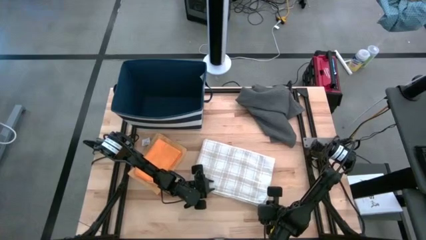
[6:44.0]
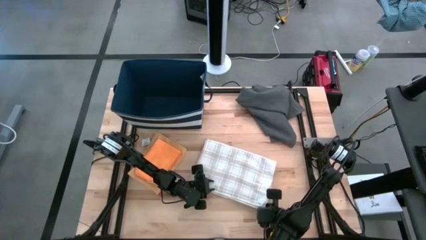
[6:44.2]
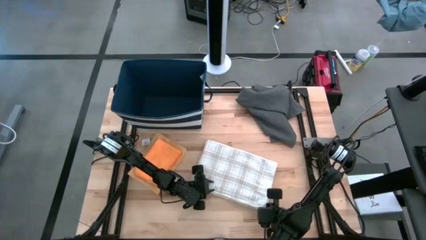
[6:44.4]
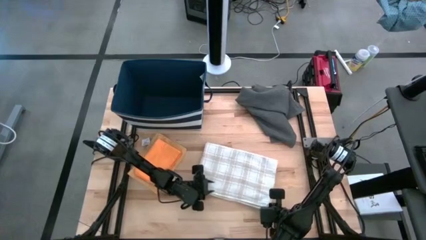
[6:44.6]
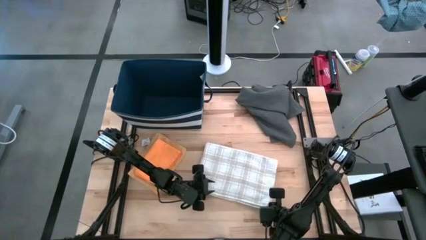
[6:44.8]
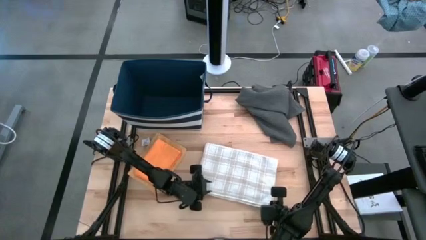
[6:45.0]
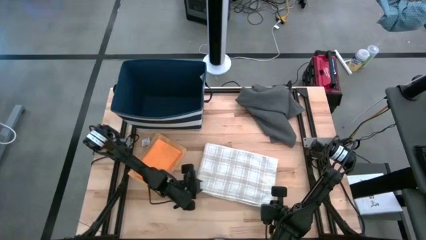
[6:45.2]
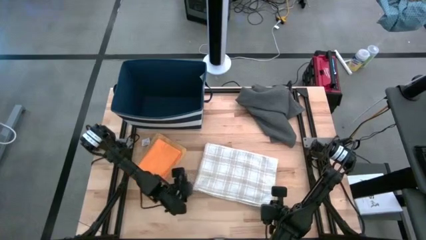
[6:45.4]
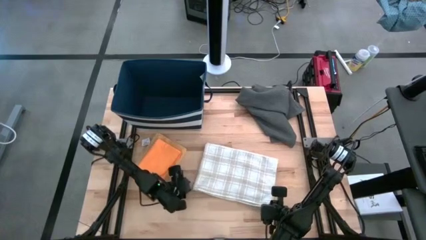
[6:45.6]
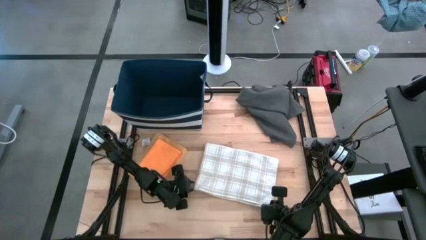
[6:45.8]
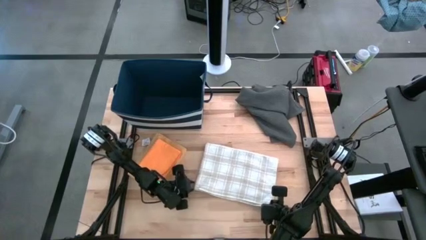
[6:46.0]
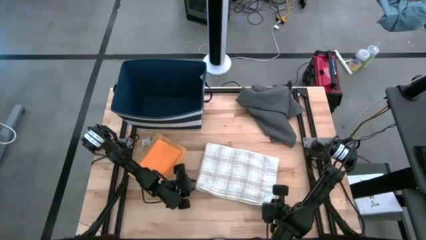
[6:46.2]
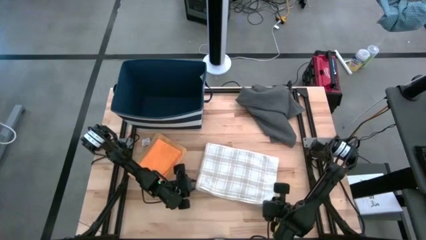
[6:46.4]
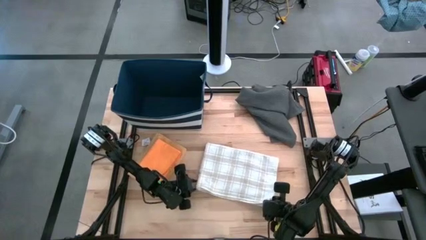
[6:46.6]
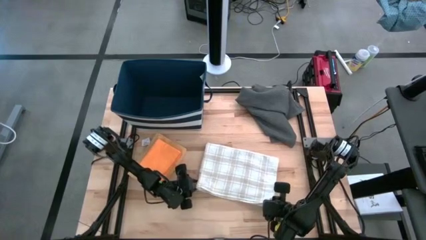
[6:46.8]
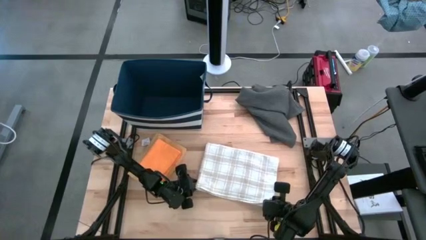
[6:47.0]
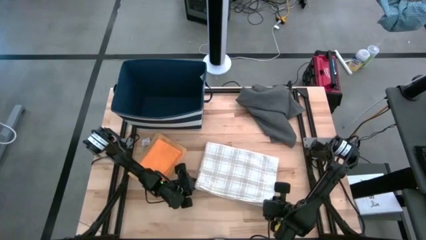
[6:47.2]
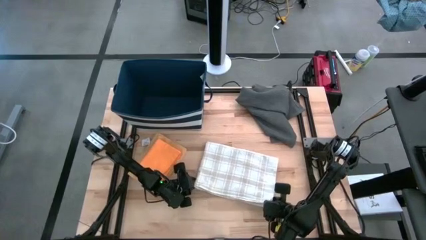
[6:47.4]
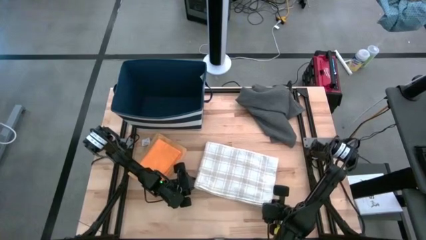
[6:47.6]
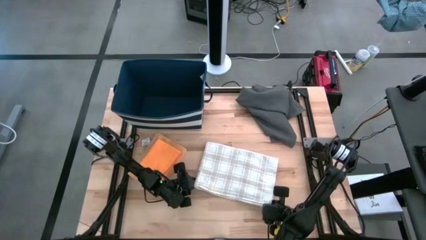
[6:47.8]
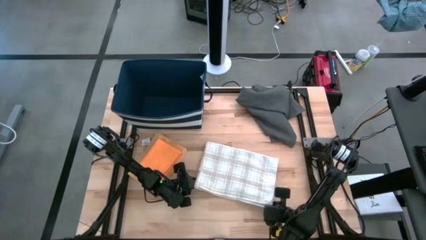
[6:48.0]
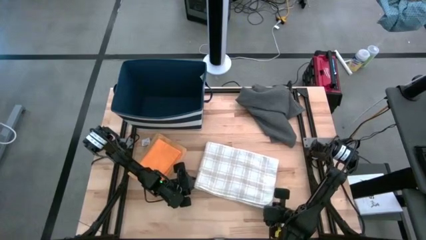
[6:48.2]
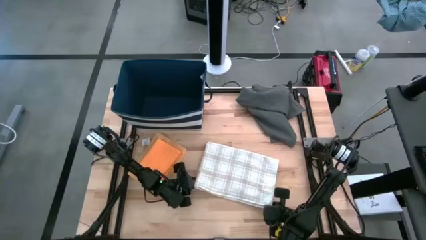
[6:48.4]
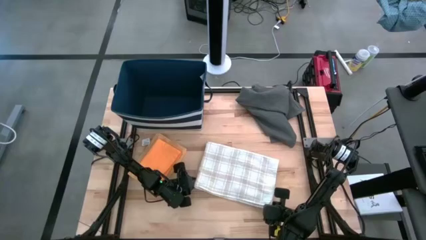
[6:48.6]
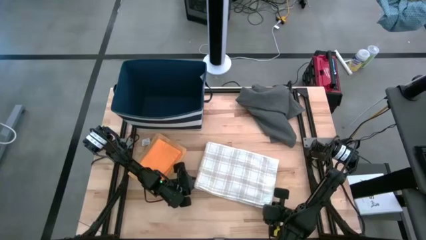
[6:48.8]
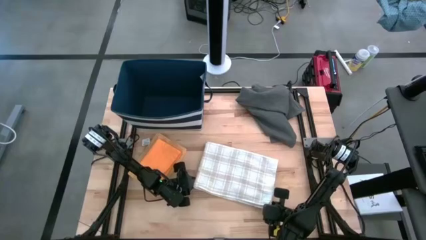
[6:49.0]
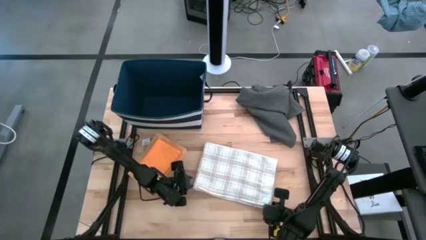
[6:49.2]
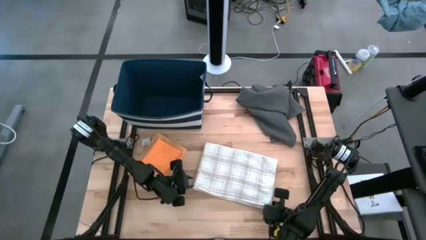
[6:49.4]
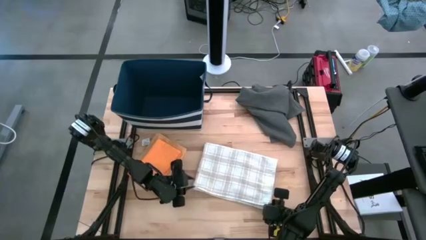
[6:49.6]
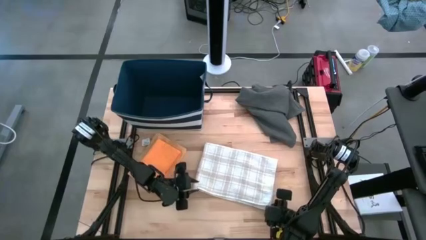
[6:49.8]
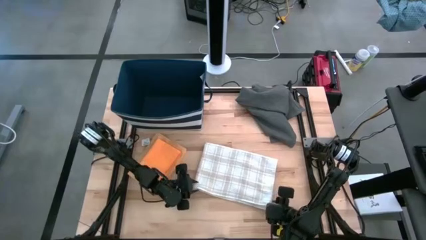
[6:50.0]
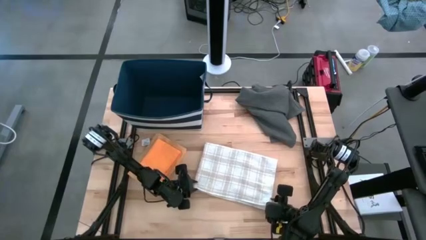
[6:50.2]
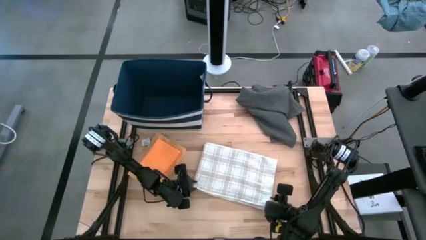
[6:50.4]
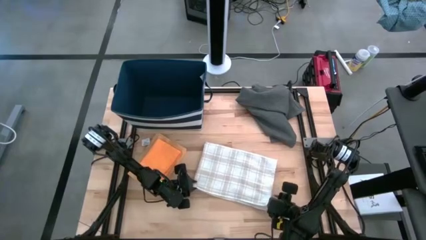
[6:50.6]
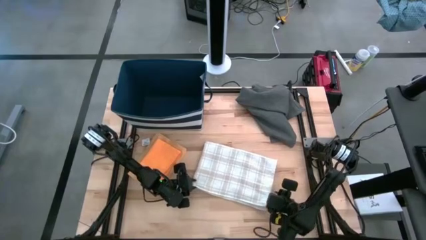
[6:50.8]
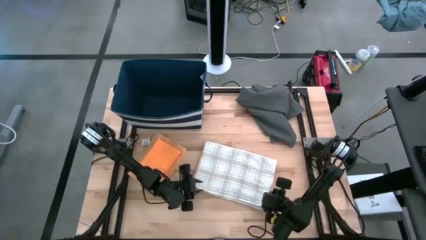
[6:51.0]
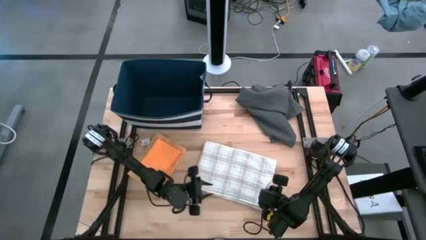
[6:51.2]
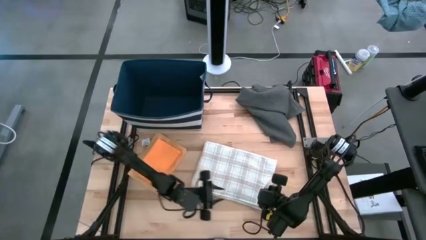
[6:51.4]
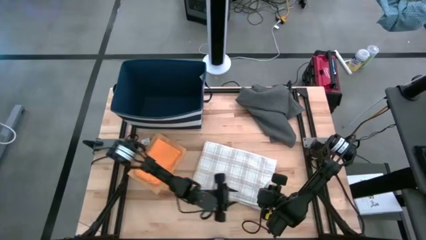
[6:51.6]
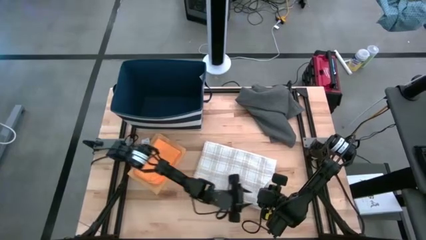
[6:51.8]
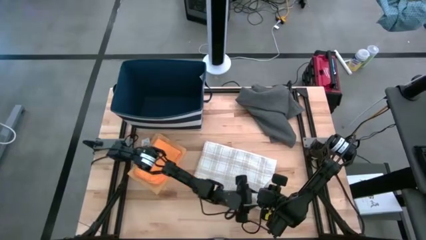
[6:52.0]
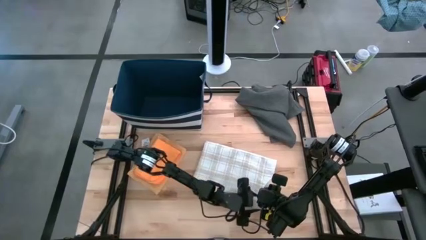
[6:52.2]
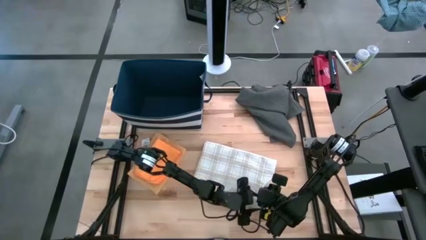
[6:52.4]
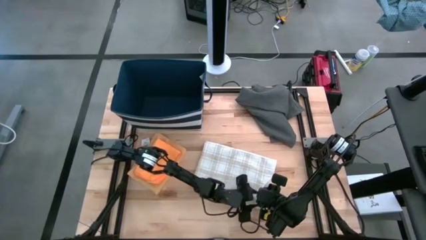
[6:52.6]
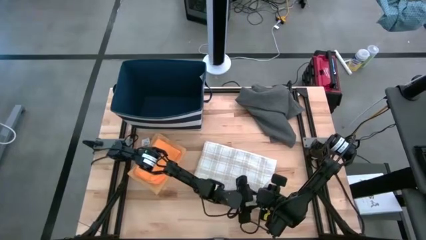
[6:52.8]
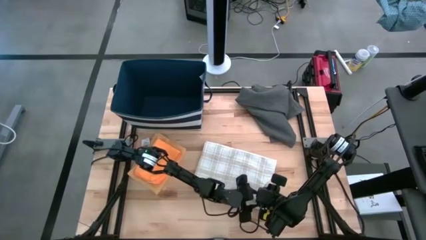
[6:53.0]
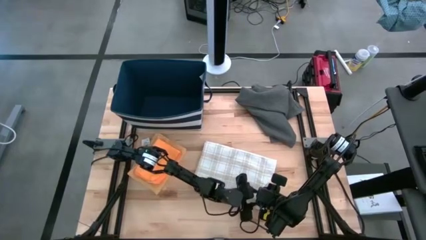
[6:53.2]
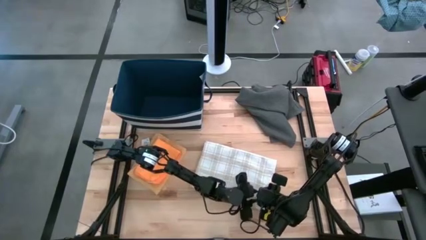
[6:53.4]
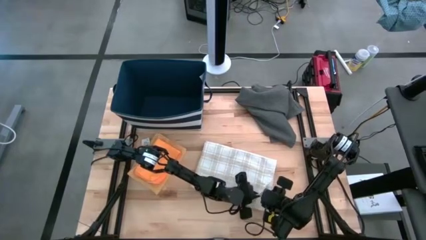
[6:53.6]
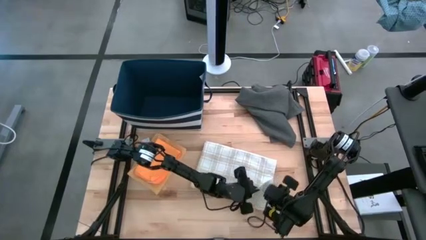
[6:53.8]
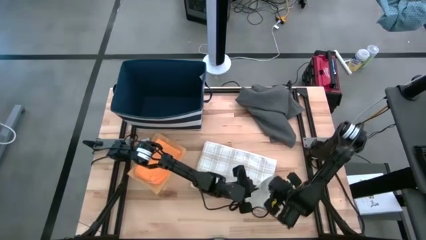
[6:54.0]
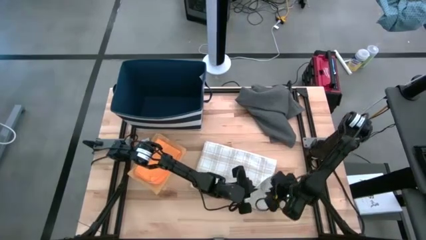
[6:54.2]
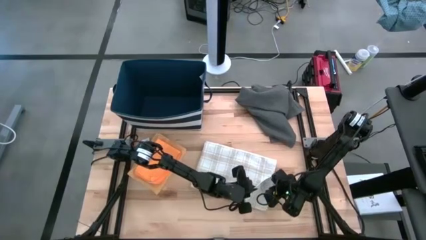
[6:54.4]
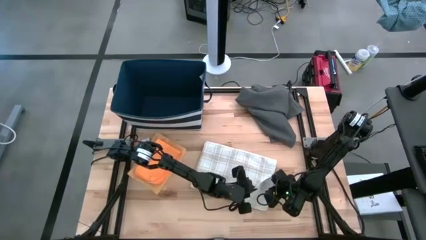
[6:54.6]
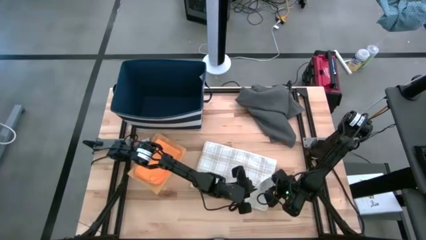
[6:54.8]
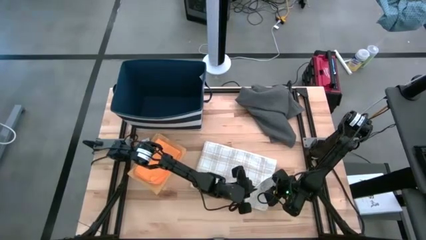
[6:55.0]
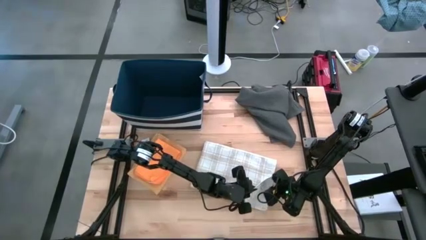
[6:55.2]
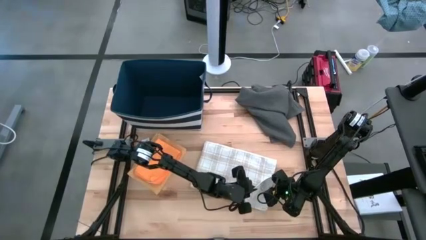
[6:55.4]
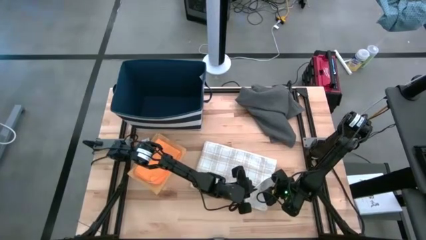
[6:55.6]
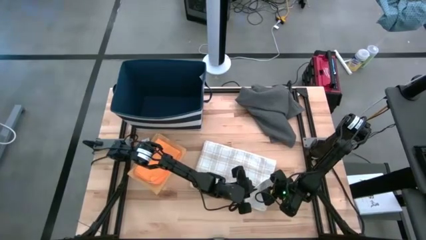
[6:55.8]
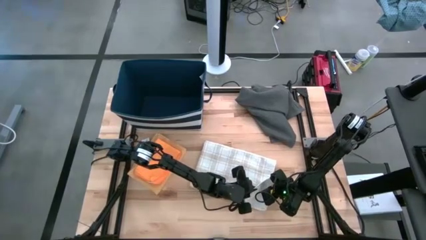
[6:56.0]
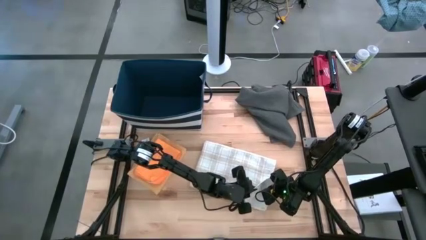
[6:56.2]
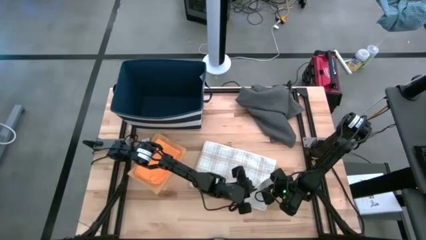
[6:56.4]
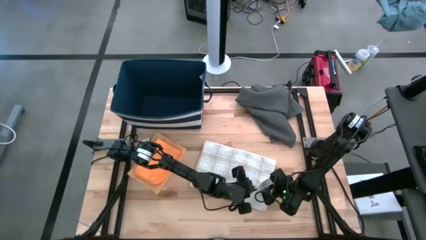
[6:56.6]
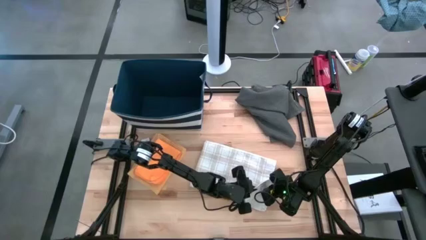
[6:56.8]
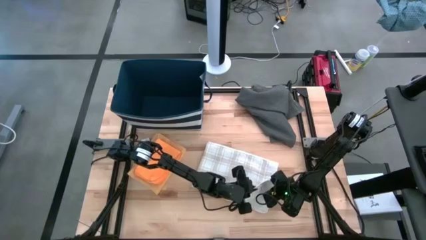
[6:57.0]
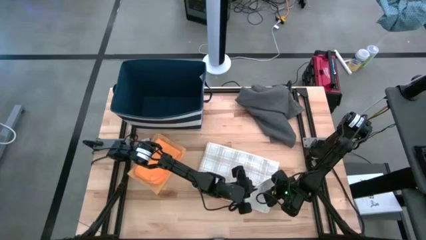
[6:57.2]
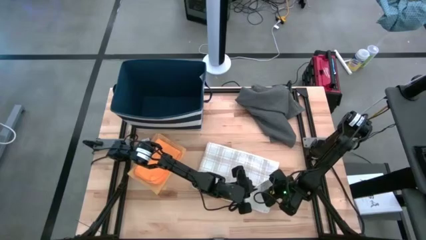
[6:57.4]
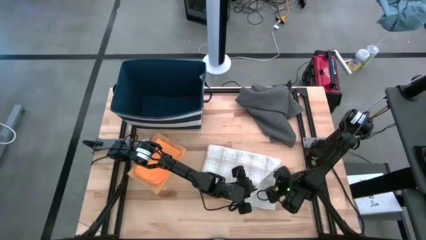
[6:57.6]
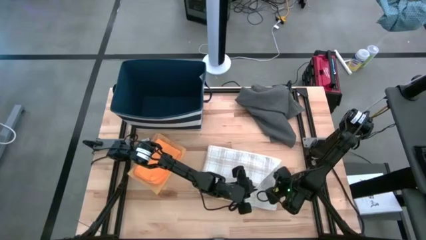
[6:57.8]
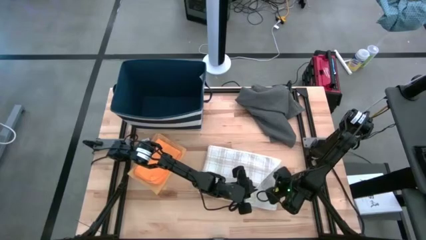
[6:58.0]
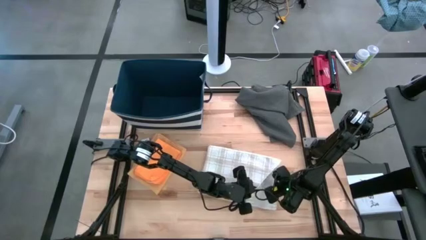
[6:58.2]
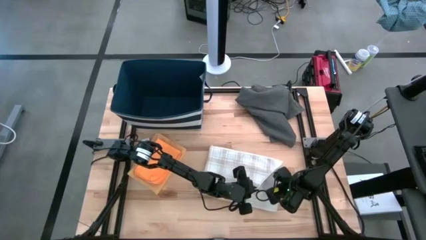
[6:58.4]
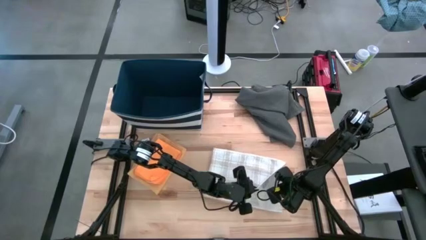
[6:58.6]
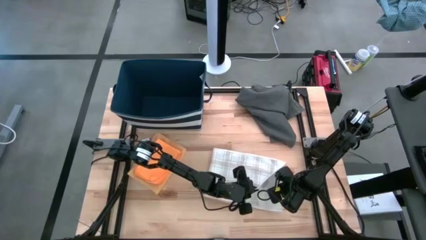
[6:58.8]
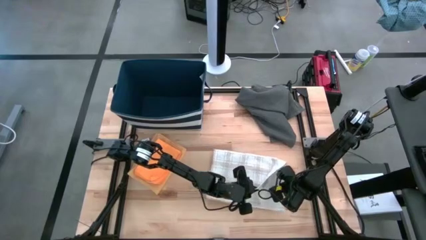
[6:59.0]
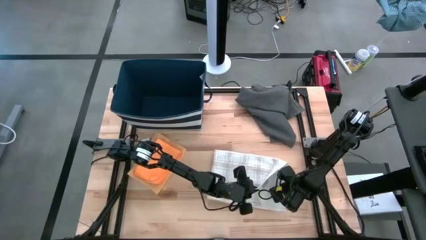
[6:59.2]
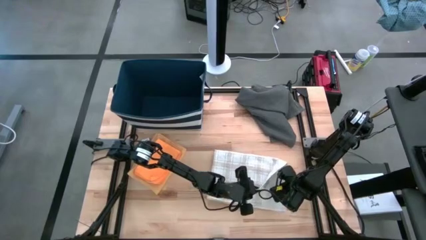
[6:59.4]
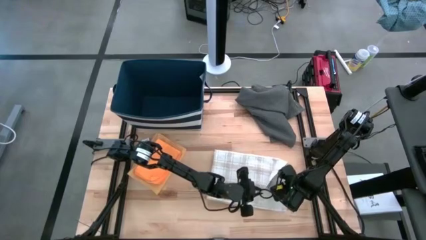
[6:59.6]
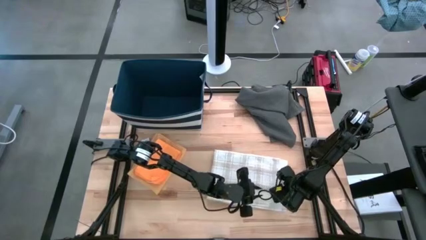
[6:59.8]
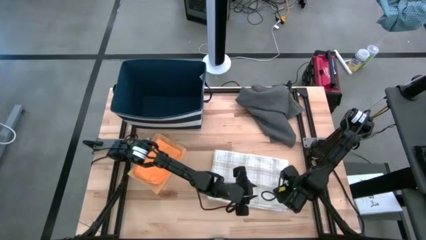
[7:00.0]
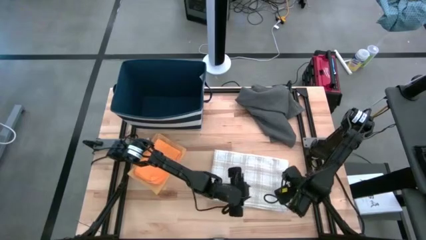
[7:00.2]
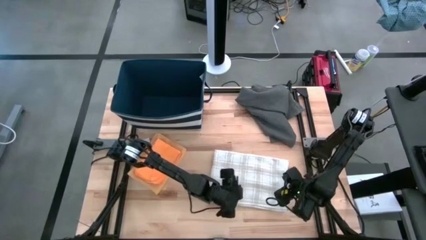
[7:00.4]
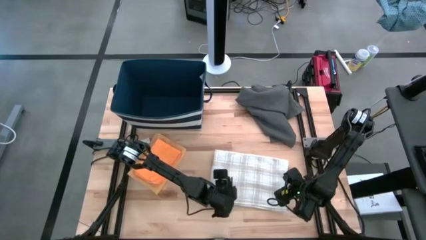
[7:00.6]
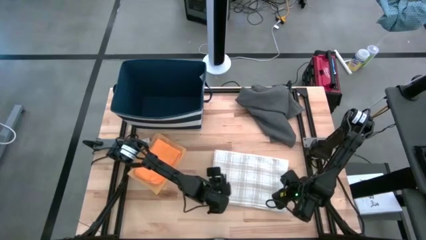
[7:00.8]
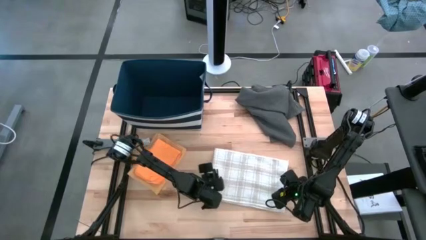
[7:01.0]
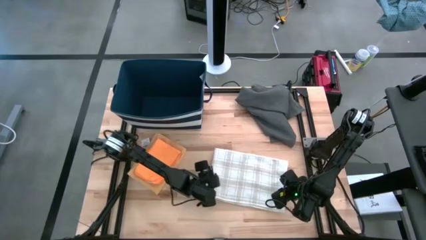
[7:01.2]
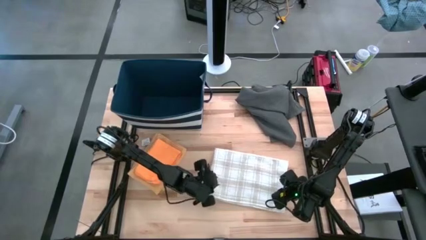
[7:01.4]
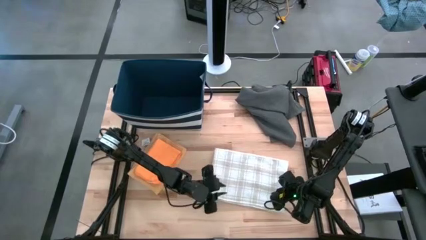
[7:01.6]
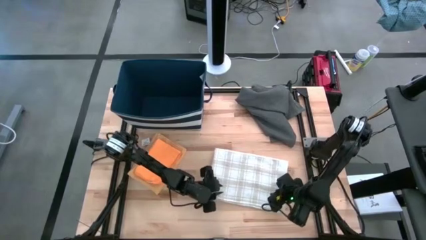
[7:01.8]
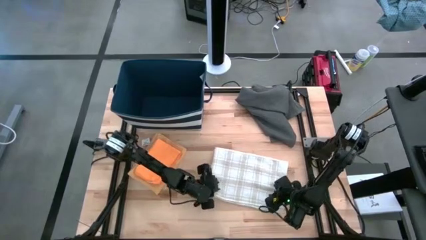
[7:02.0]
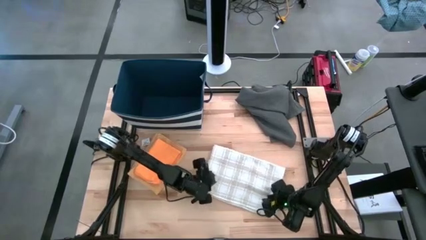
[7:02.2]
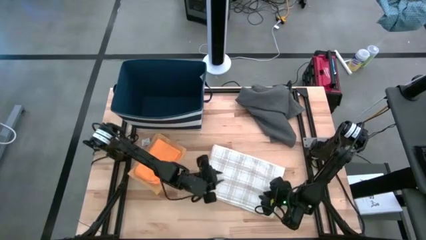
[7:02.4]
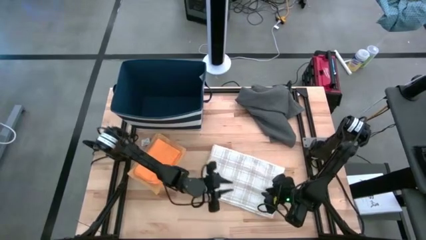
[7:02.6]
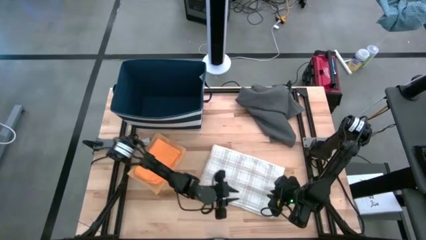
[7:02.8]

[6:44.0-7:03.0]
Task: Fold towel
Fold the white patterned kitchen towel
